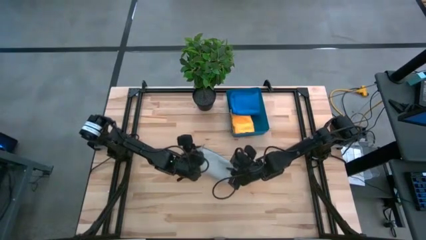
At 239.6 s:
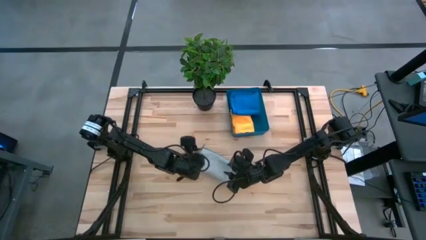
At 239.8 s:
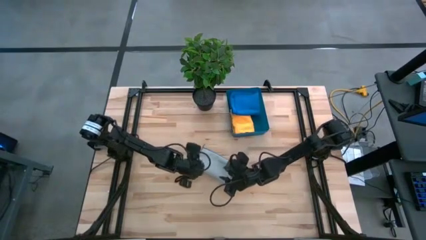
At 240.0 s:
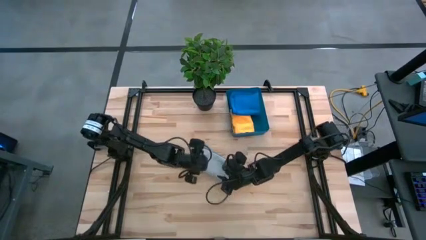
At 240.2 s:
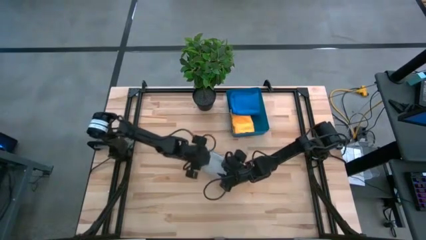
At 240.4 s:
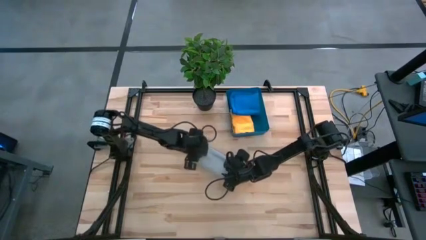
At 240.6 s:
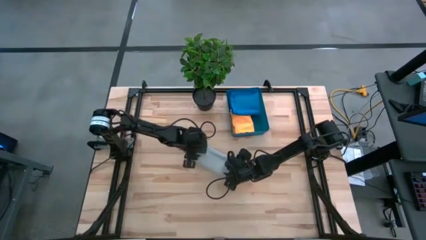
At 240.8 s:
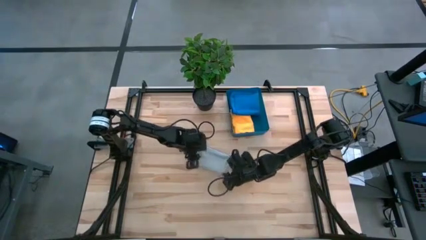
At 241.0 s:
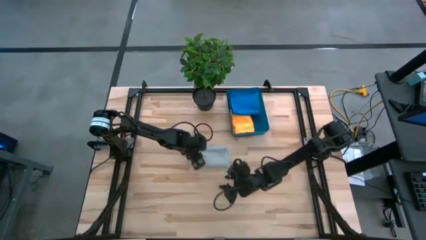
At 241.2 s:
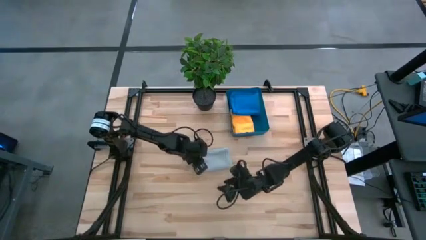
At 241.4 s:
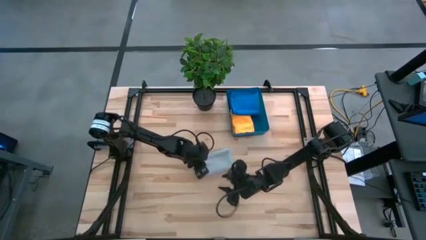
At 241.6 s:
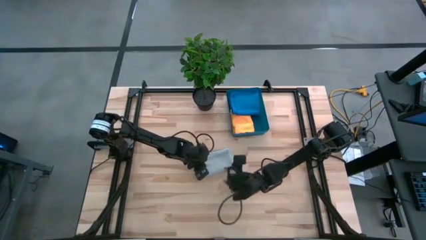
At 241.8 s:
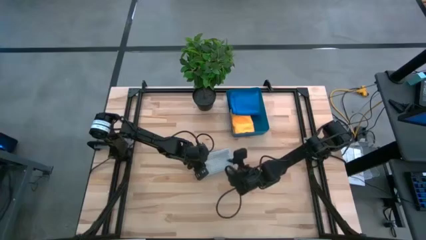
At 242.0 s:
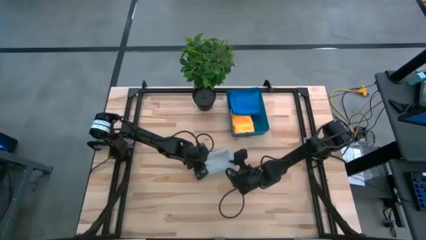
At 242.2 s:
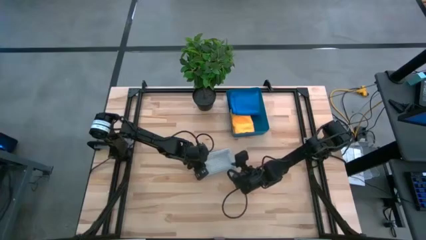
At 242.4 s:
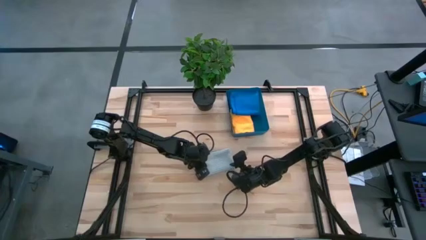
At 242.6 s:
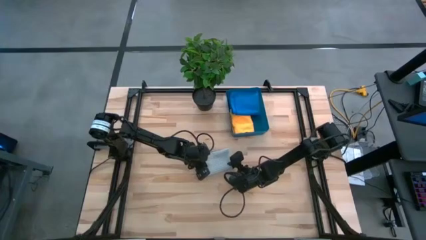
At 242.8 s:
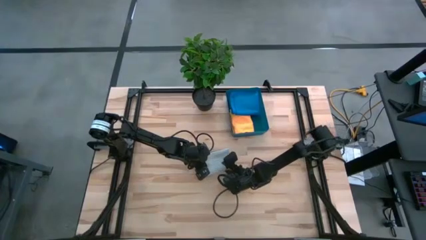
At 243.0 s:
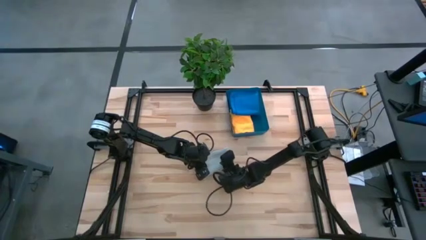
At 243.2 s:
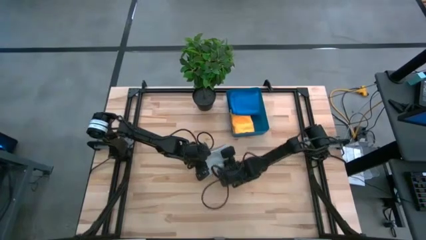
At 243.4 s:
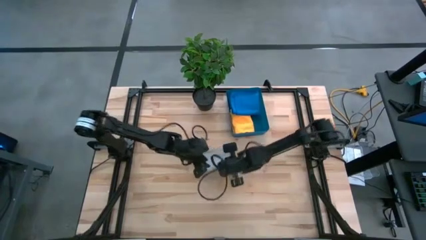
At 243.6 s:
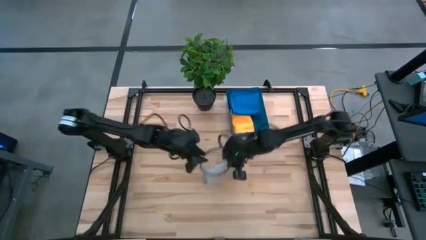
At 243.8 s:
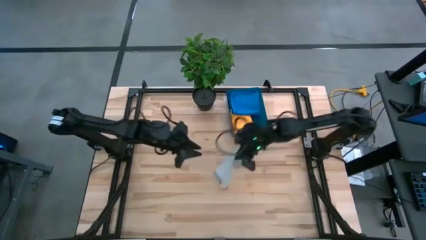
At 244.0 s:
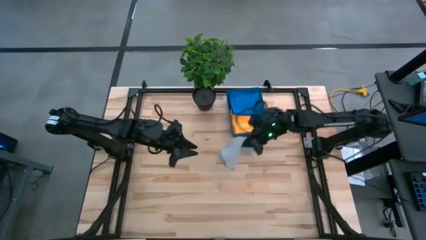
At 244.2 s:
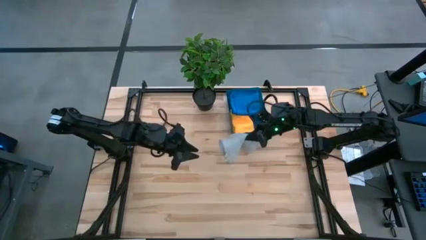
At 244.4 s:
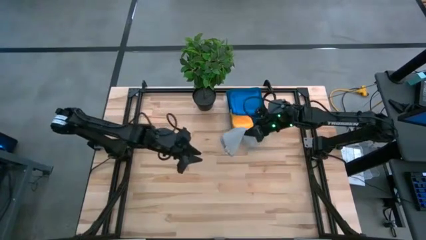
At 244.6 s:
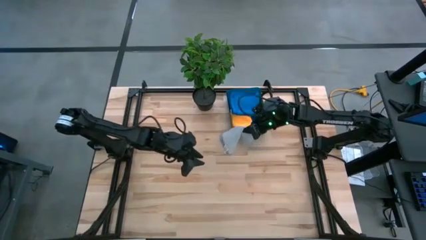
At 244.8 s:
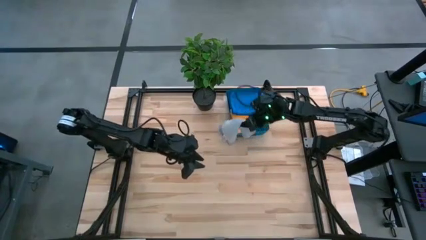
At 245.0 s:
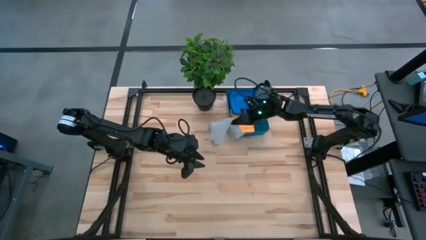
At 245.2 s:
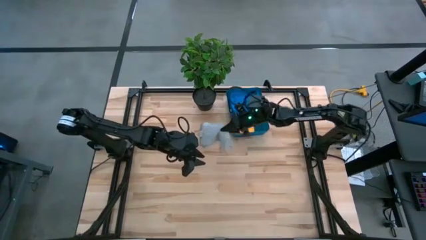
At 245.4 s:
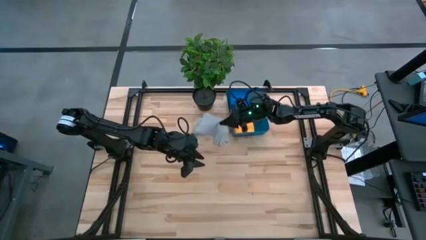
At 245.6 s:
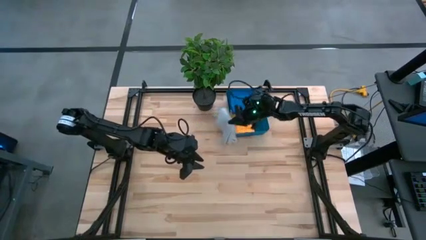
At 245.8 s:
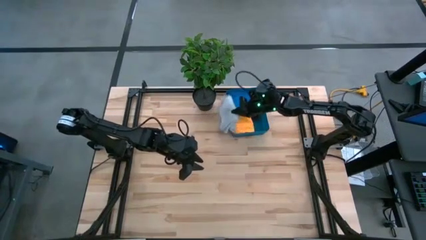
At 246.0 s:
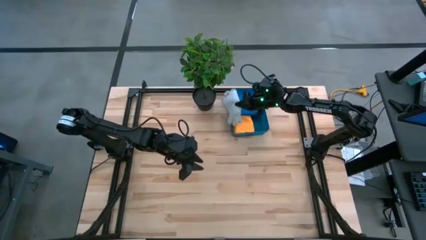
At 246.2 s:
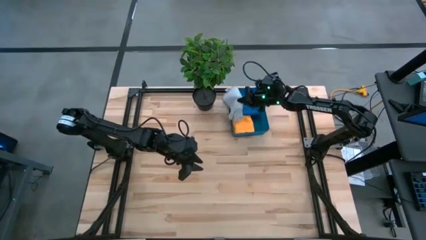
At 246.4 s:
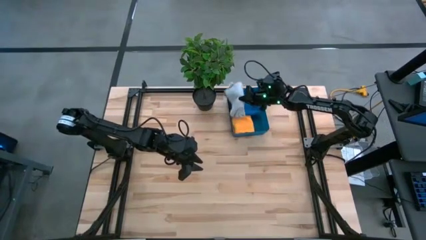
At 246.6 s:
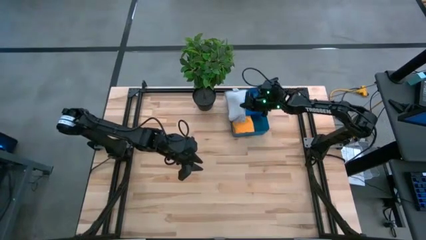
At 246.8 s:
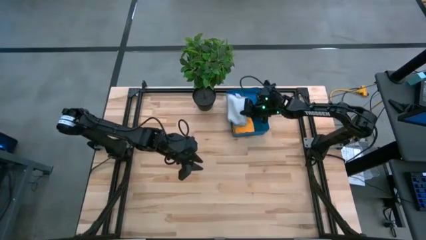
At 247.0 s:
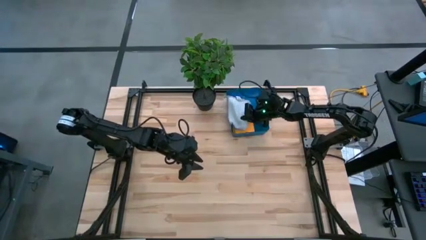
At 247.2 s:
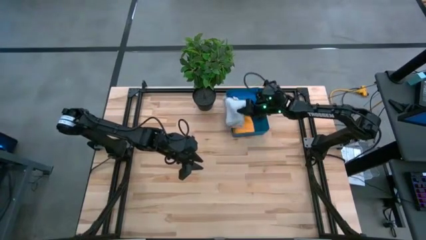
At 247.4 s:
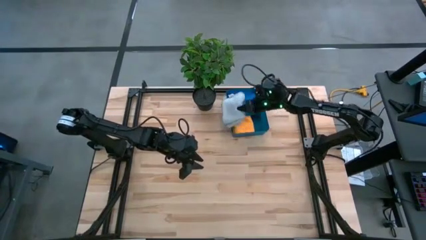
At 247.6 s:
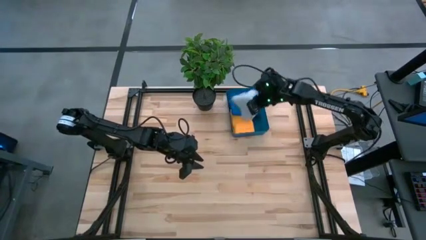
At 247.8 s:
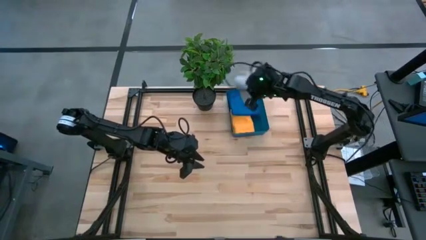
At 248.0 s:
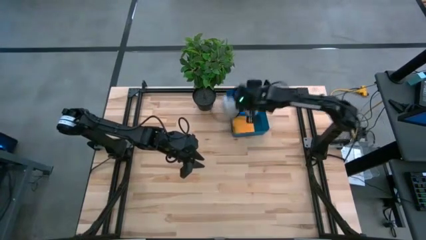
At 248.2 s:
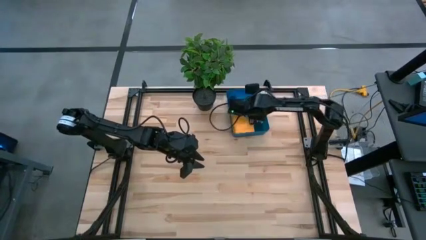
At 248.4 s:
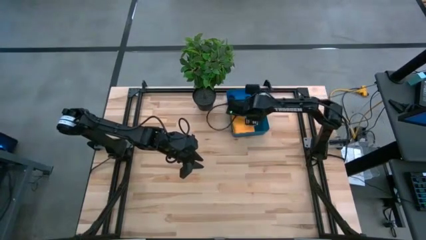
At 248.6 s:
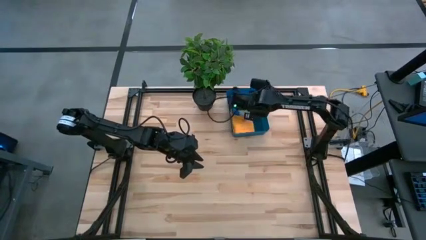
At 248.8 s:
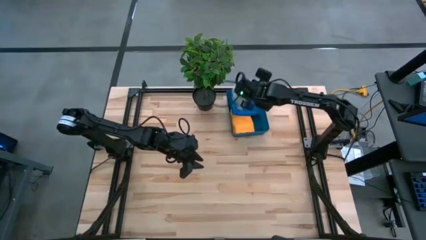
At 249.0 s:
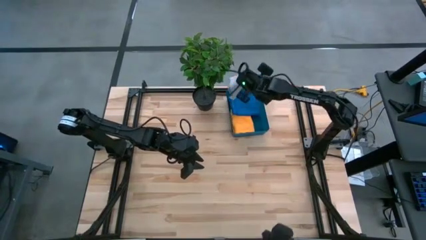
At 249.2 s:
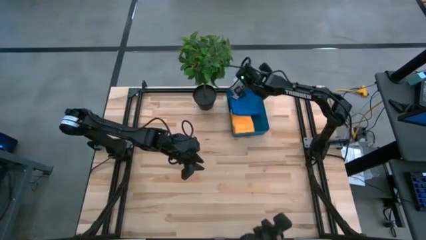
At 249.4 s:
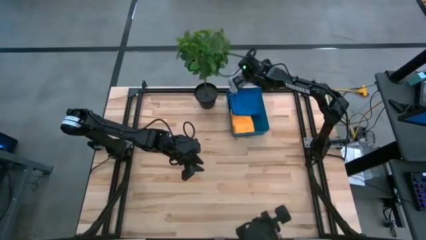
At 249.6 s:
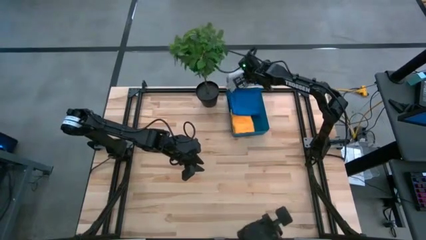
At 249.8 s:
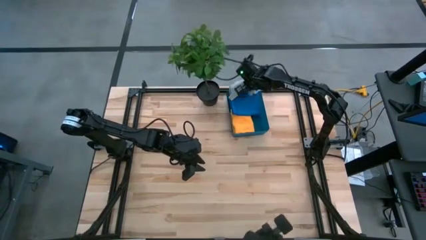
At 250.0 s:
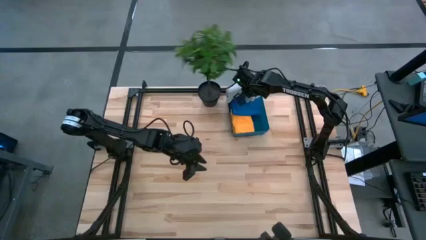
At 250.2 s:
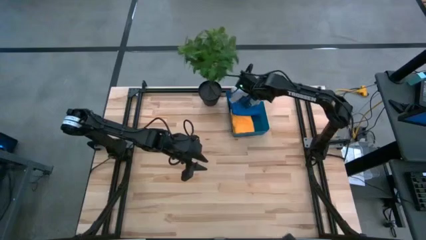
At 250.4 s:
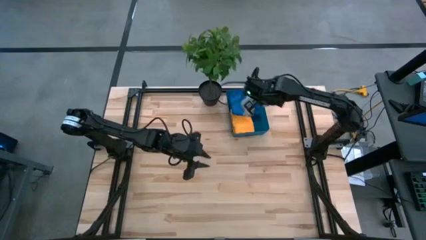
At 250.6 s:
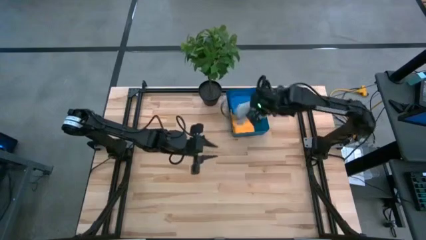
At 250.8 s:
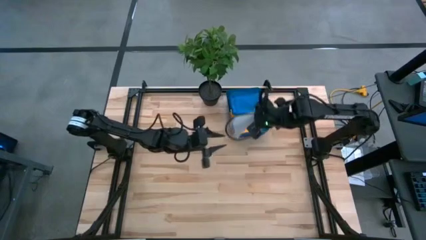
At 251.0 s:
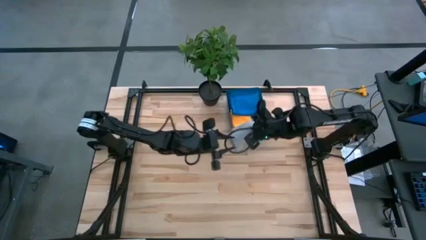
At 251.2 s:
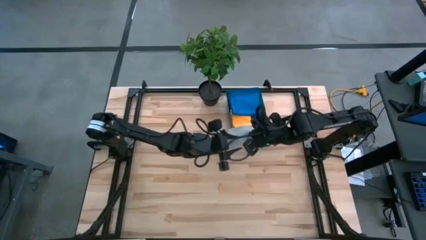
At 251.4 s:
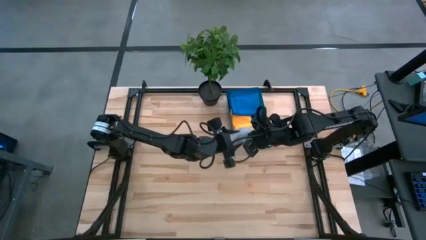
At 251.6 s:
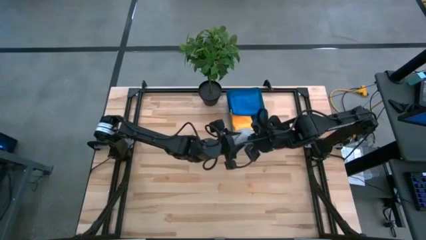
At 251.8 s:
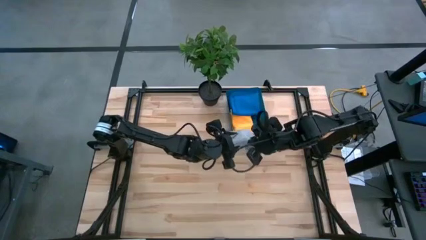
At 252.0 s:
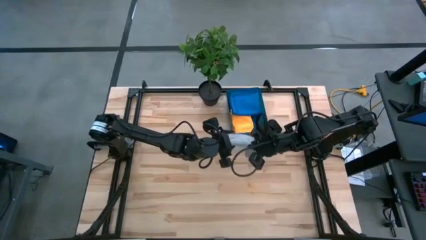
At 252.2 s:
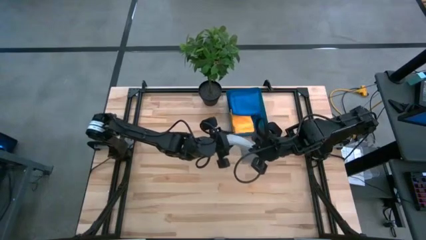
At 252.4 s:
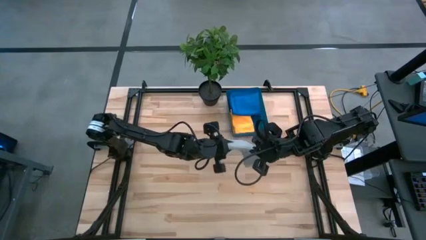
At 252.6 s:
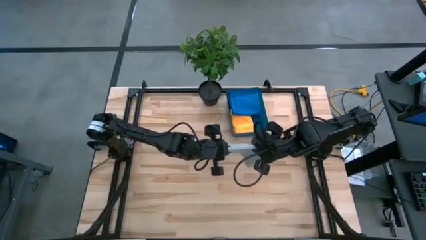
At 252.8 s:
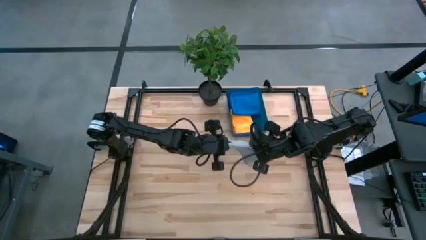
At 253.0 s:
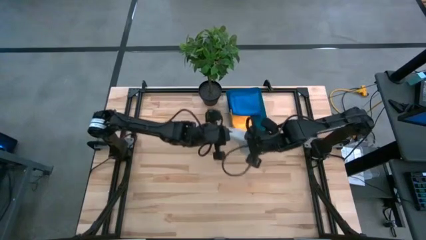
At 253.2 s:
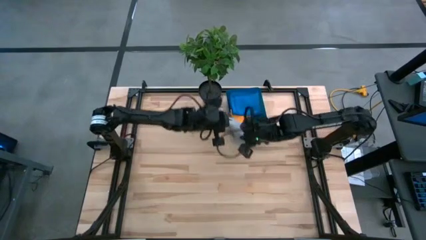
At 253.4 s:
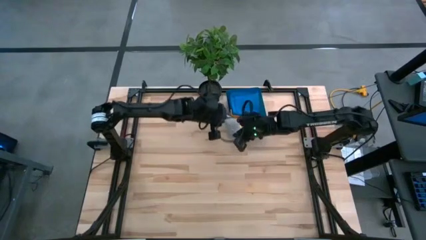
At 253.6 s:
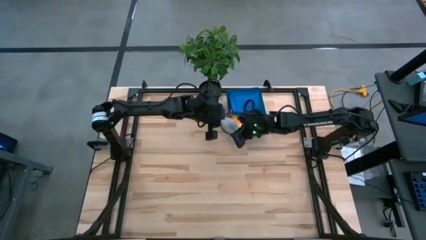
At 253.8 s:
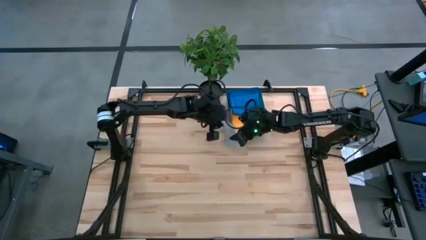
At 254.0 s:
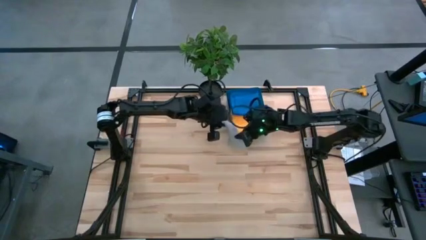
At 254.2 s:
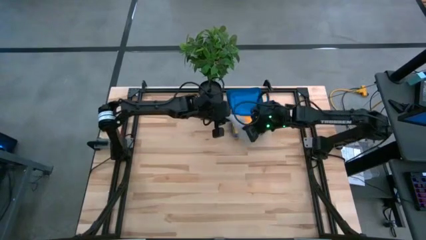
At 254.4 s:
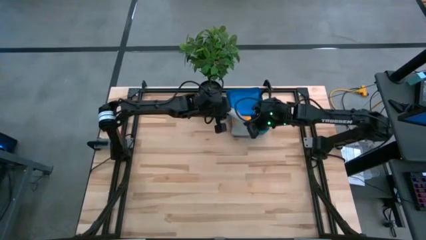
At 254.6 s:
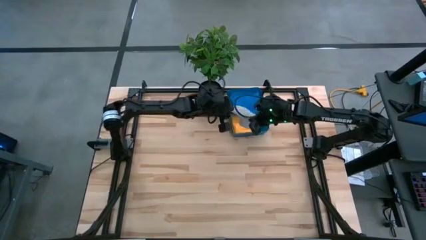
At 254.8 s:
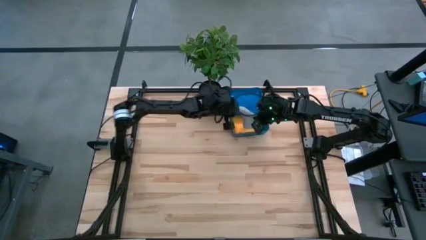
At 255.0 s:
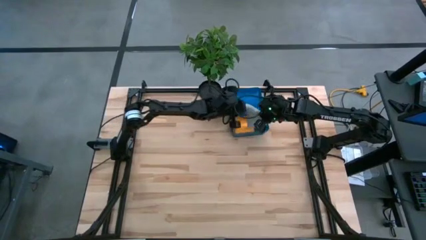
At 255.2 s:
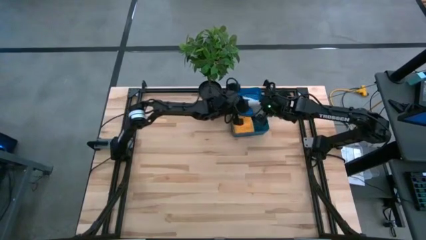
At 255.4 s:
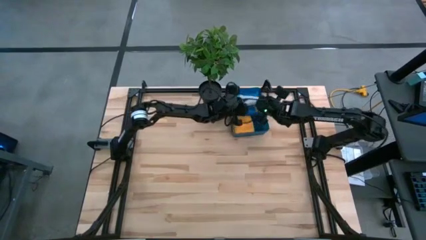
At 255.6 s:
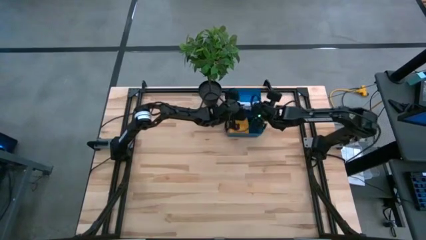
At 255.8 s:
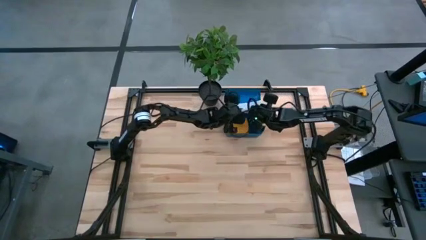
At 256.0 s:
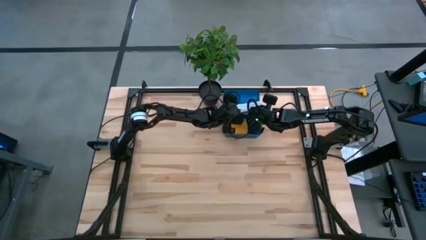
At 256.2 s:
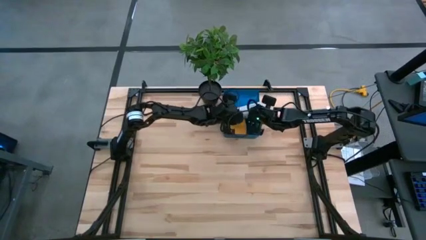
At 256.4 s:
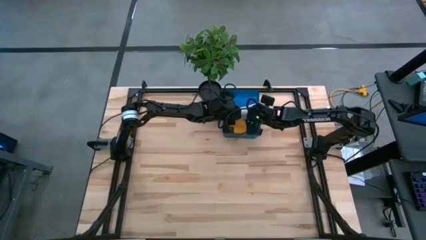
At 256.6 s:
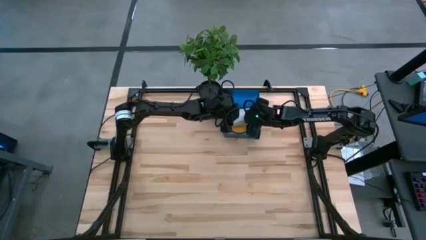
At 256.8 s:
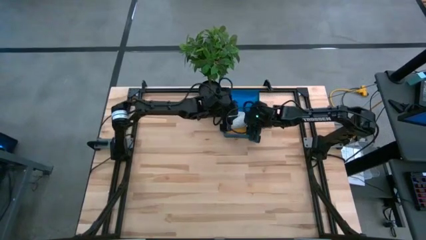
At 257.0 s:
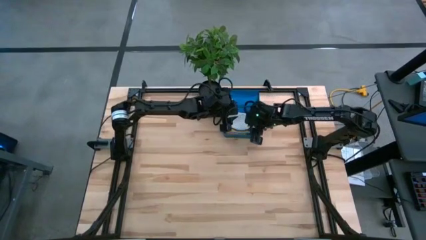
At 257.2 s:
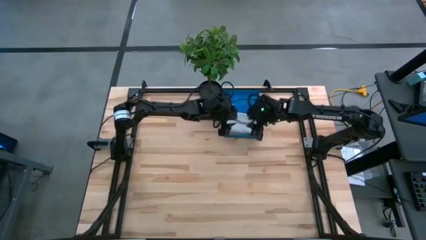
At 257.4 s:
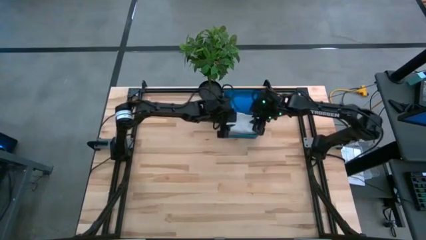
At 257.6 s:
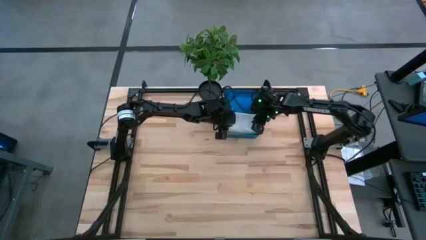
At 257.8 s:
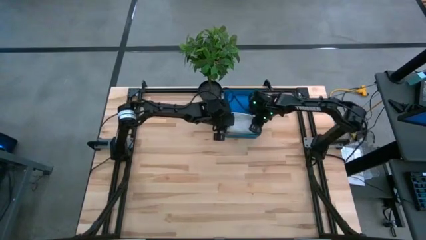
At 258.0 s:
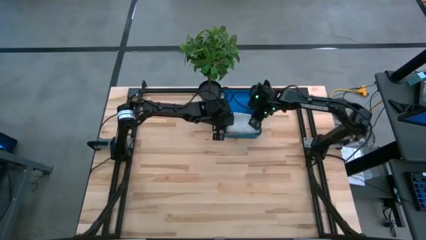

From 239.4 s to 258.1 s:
Task: Fold microfiber towels
Put the gray microfiber towel in the blue bin
